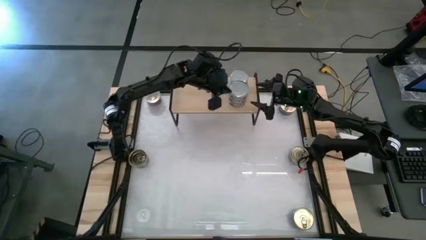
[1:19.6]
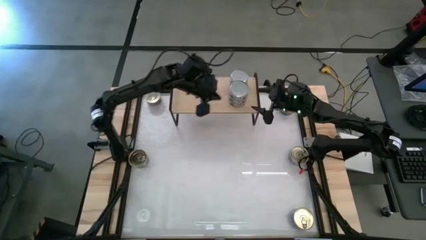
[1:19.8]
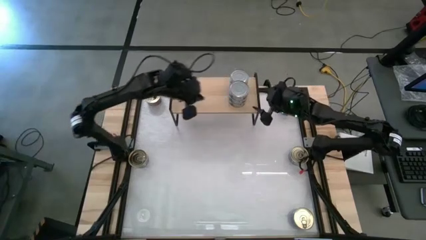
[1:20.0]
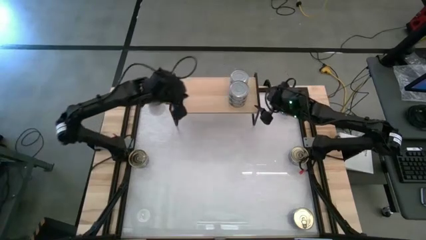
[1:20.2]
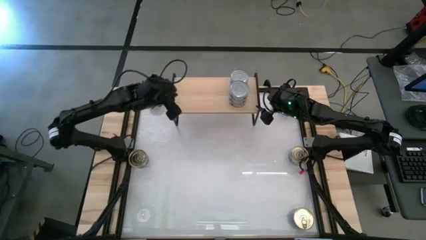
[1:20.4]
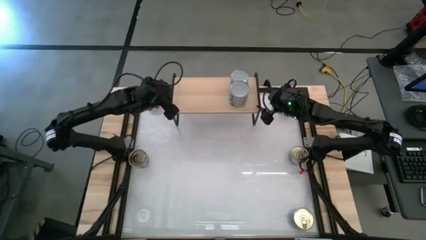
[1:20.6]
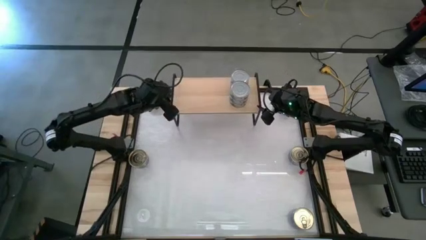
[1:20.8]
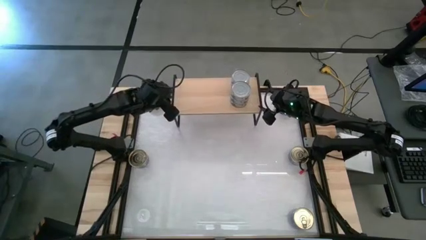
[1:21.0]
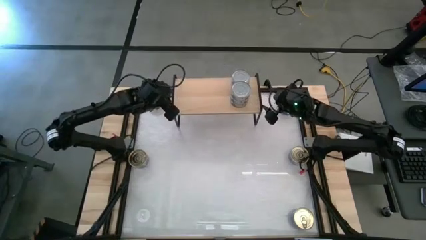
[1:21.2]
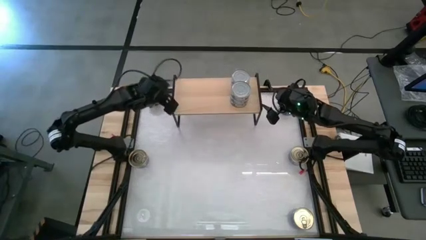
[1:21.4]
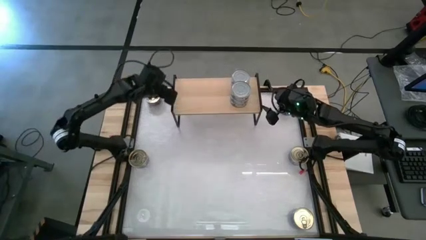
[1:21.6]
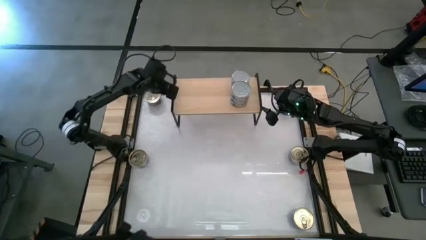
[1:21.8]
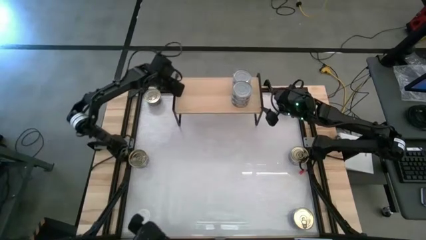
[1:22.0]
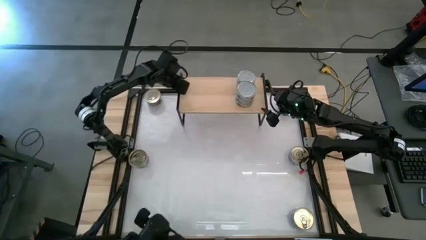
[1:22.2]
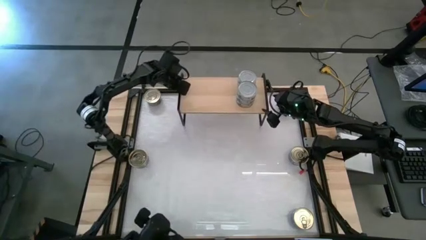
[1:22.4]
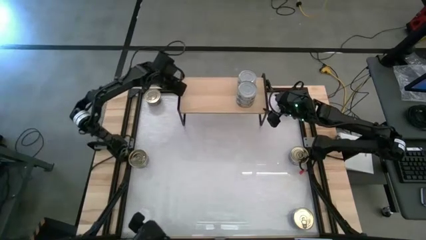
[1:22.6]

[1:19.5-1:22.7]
Task: Stack canned seafood by type on shelf
Adjust the shelf

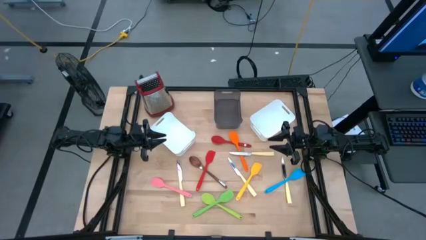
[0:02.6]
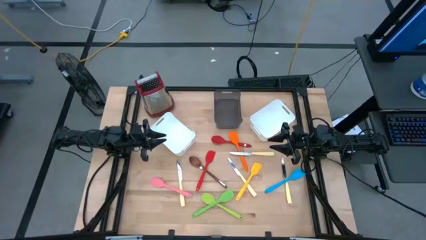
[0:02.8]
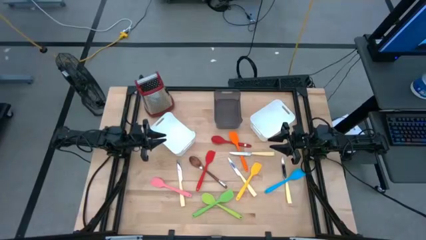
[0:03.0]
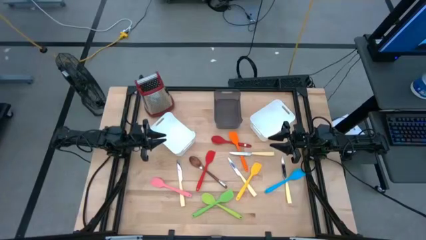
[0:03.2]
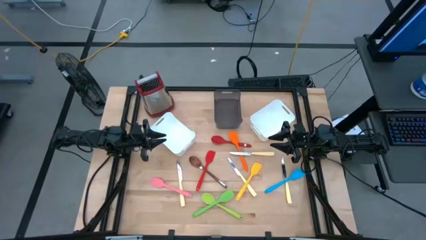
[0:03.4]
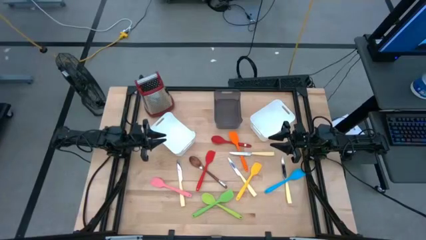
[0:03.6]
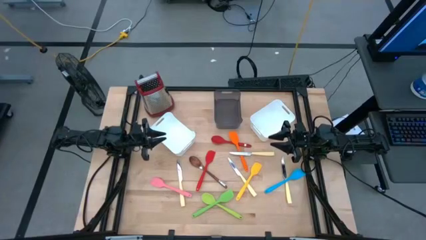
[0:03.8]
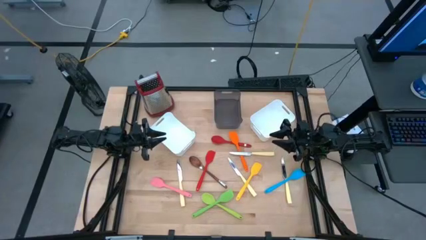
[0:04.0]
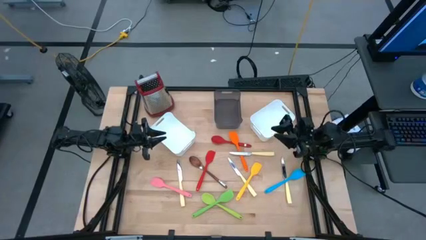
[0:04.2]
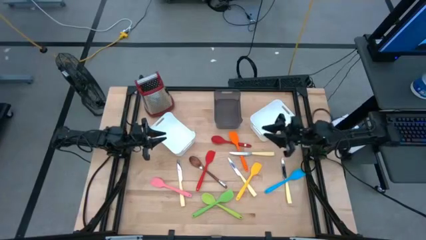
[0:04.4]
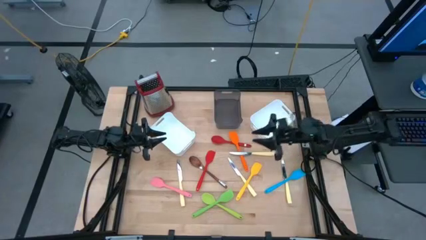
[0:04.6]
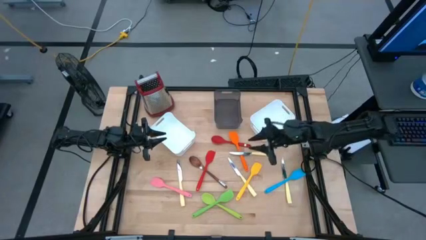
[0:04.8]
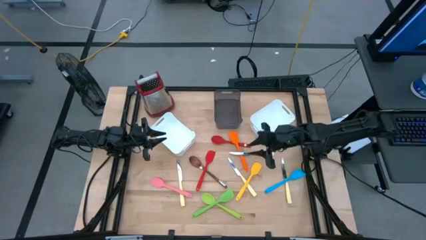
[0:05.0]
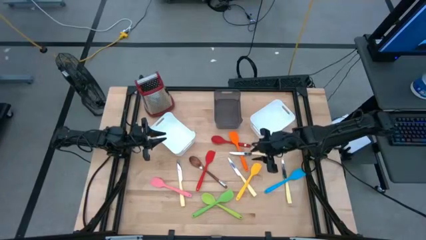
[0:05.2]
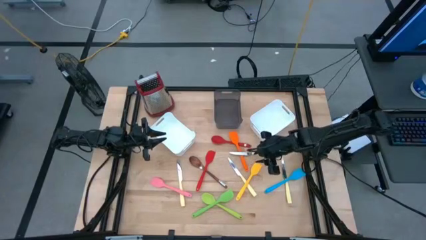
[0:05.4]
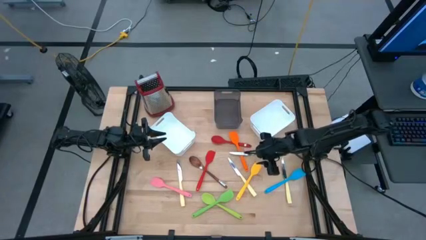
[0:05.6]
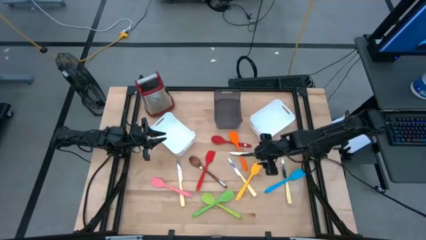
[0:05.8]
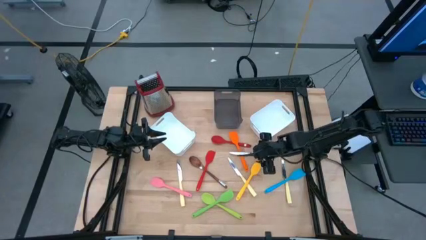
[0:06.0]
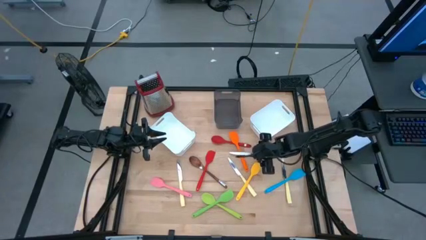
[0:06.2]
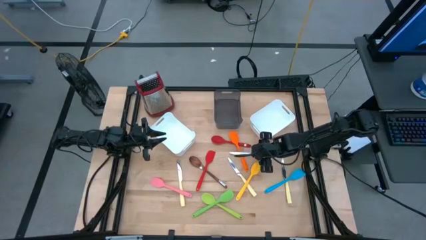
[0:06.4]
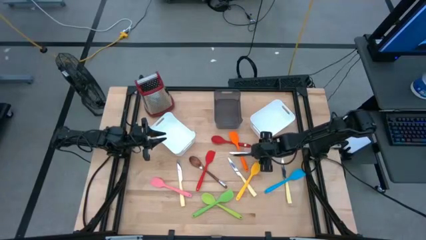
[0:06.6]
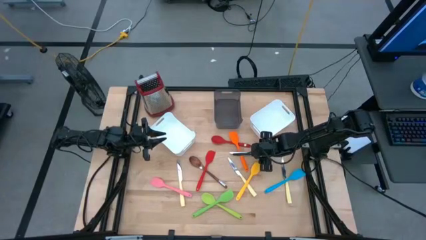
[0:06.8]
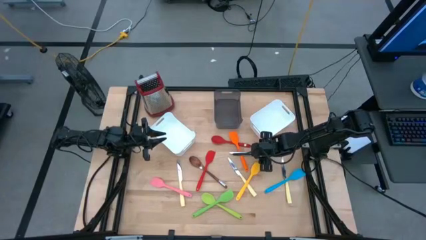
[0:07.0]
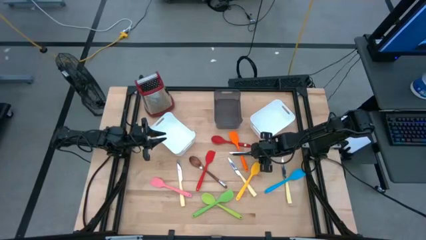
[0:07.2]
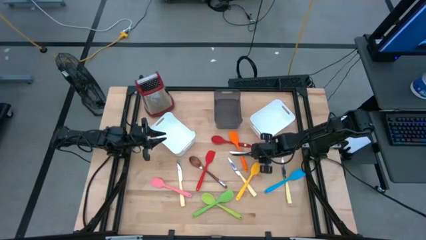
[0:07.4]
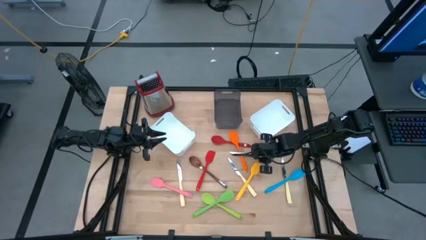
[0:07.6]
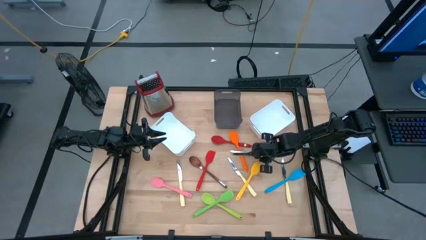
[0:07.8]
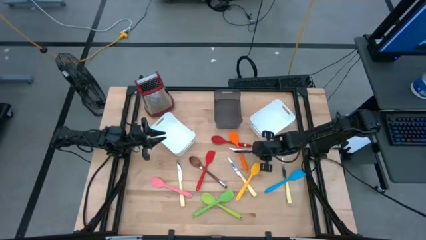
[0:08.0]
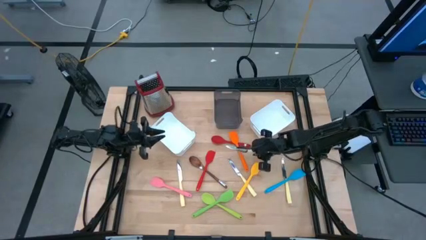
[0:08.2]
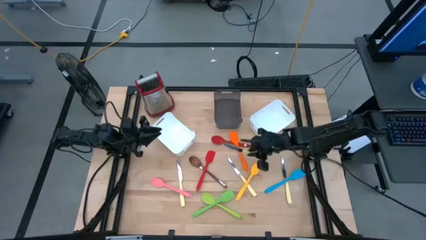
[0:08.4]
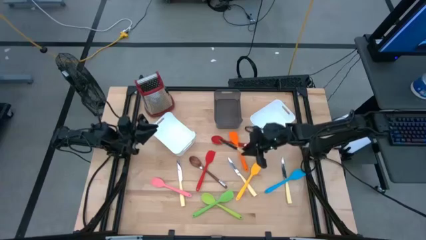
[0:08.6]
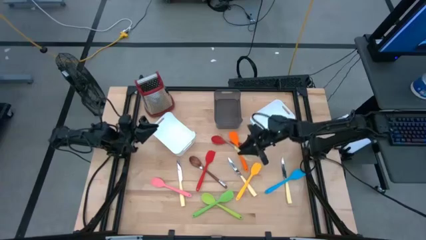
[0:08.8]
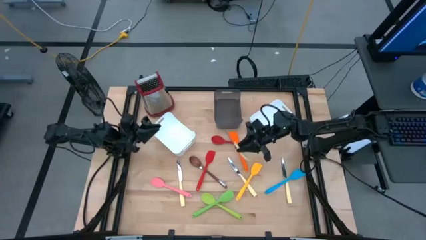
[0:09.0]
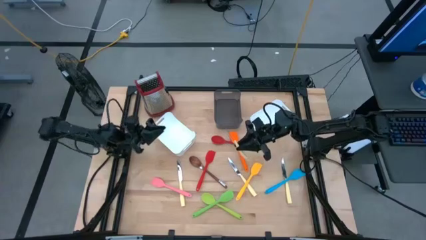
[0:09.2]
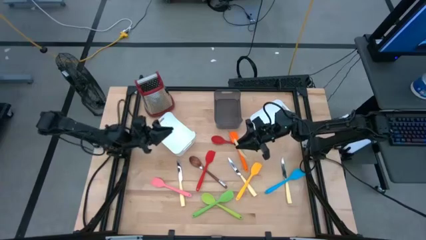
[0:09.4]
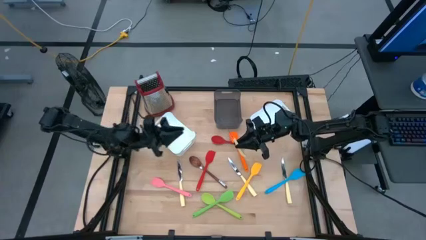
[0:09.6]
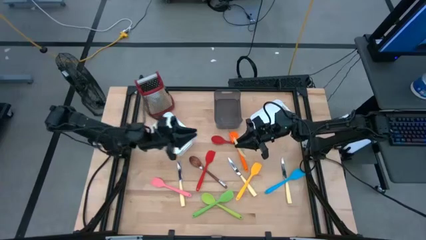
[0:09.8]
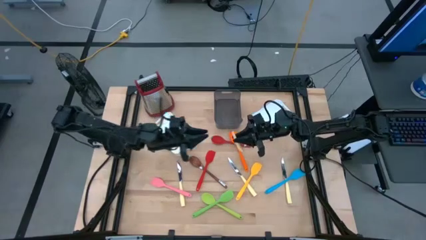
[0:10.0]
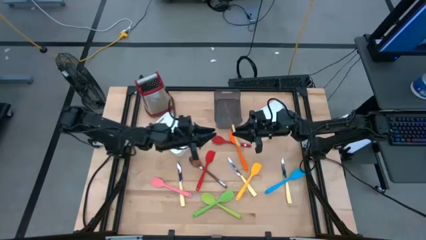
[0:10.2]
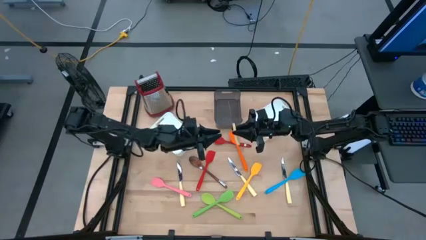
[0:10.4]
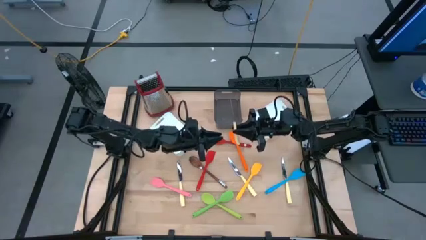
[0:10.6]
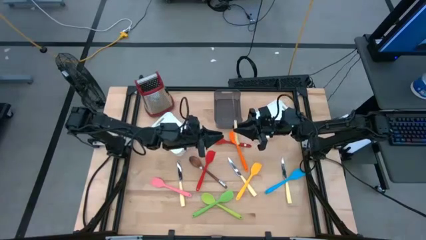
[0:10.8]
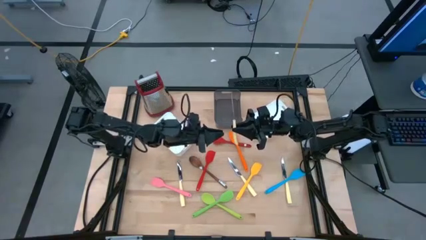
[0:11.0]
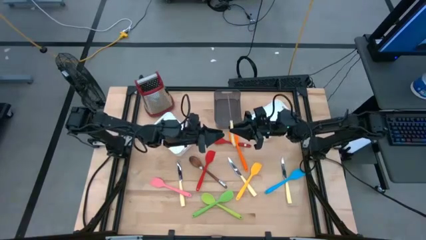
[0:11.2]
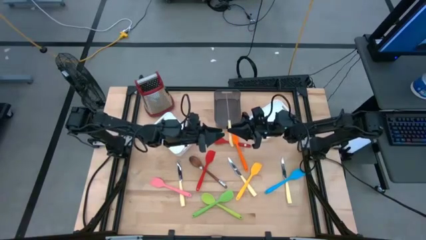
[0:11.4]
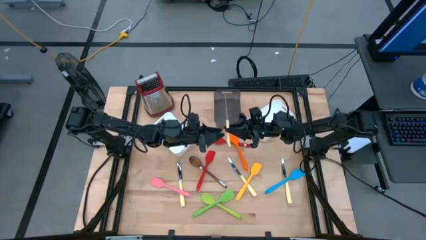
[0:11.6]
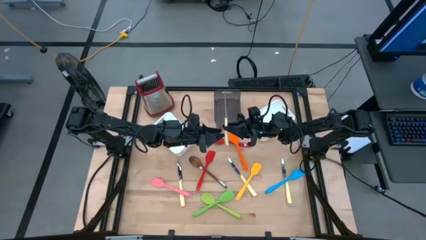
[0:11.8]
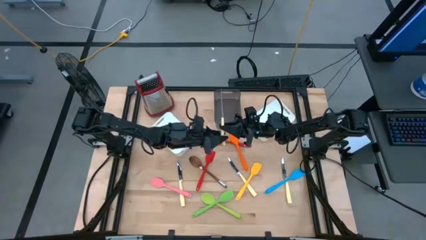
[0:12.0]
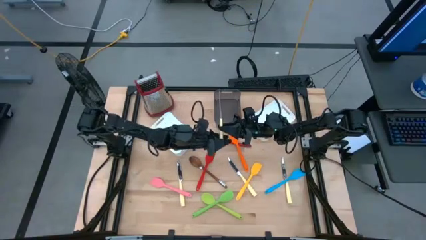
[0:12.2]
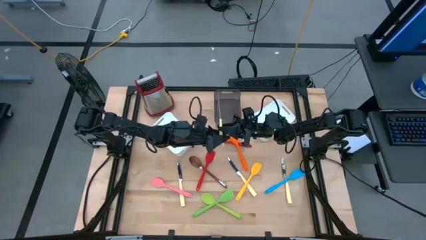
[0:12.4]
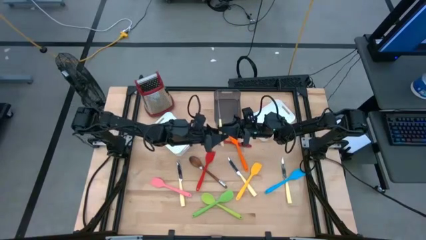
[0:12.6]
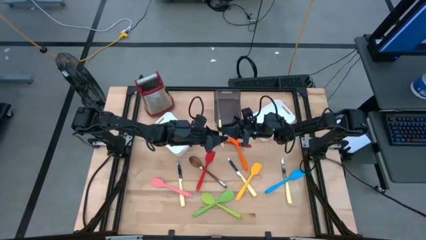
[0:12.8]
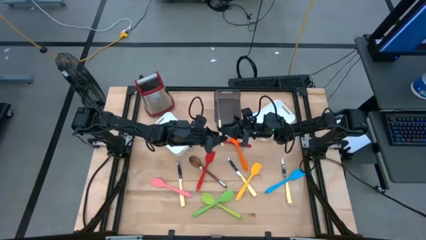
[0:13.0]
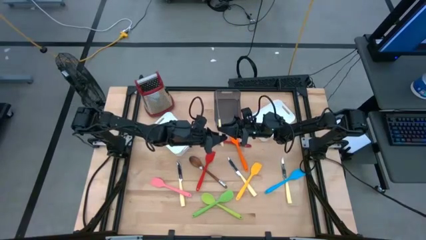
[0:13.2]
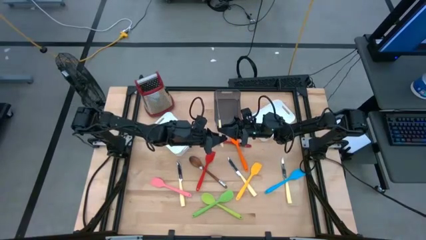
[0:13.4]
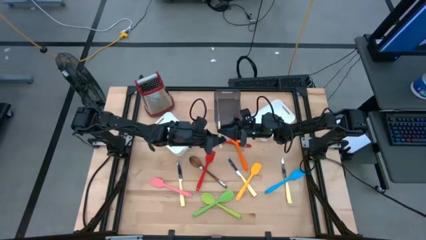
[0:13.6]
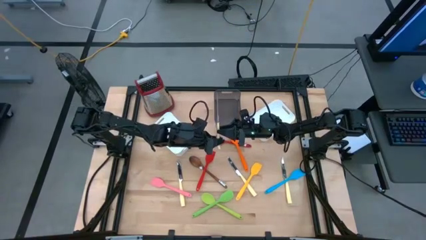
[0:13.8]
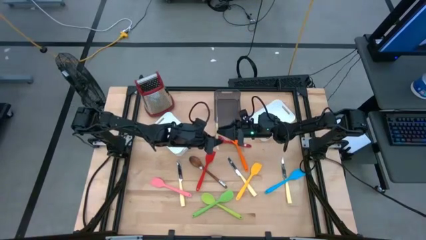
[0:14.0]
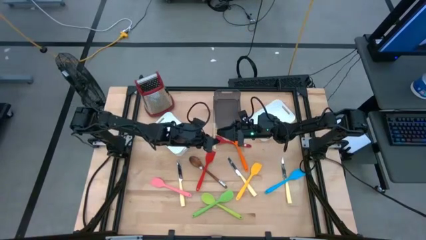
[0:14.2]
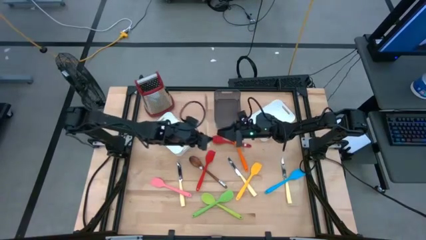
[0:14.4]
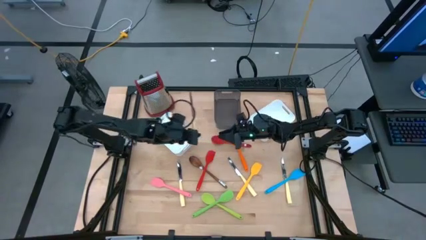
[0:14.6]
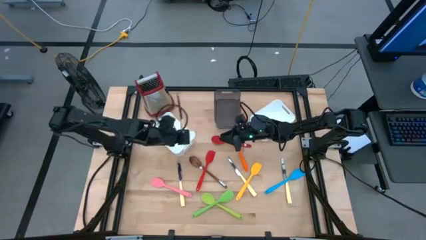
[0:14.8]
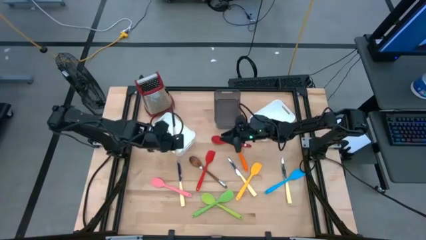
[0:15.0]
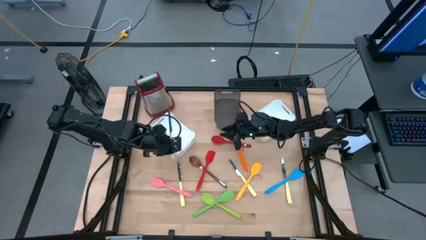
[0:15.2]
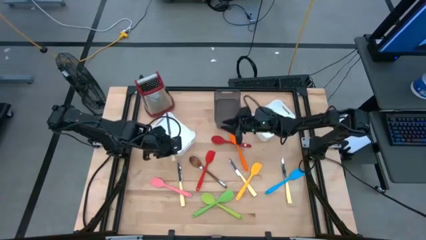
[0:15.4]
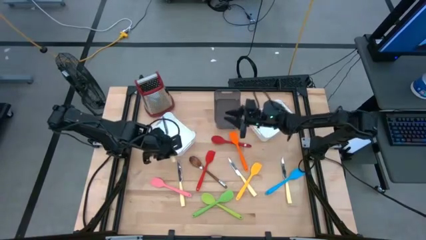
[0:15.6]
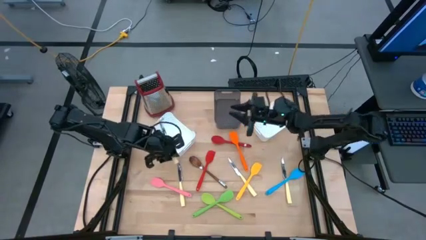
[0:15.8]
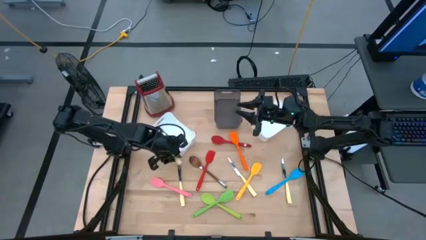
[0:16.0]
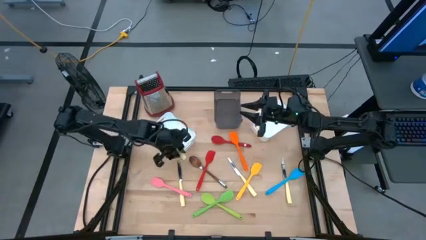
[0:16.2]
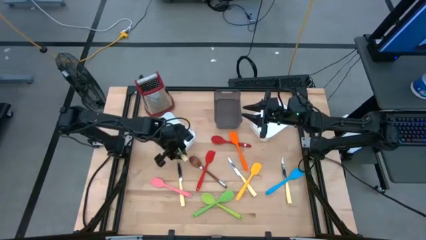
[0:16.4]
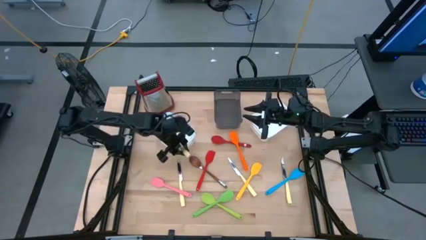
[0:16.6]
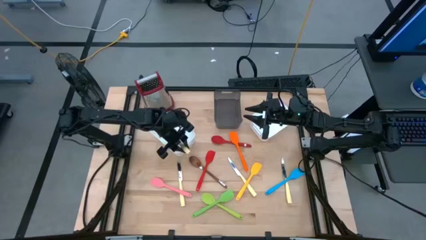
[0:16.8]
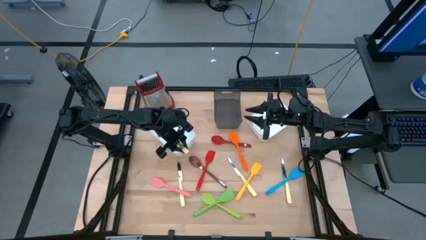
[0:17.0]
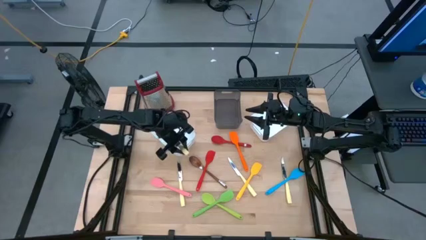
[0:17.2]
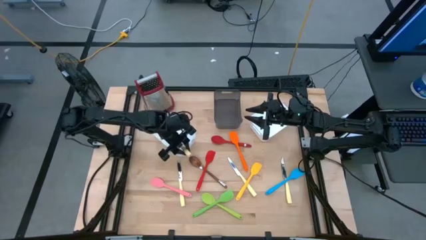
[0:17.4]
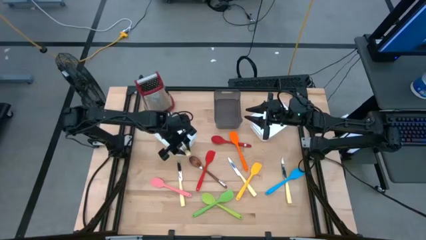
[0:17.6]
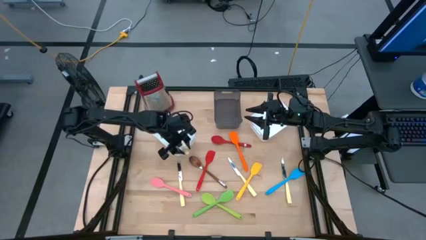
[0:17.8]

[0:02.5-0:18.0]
Task: Pick & Place Kitchen Items
Put the yellow table knife into the left white bin
